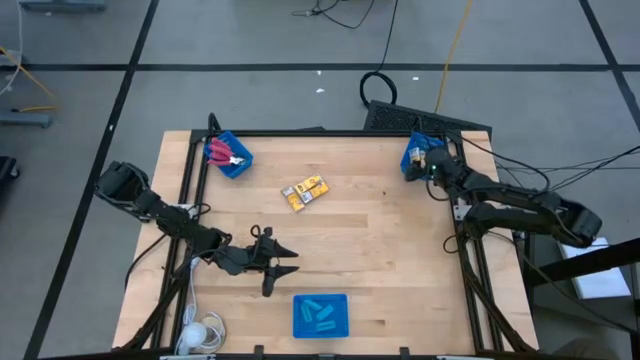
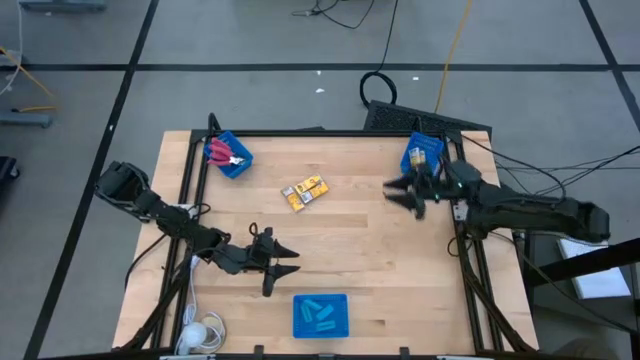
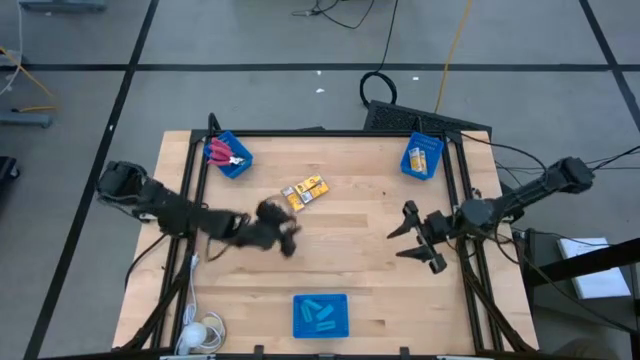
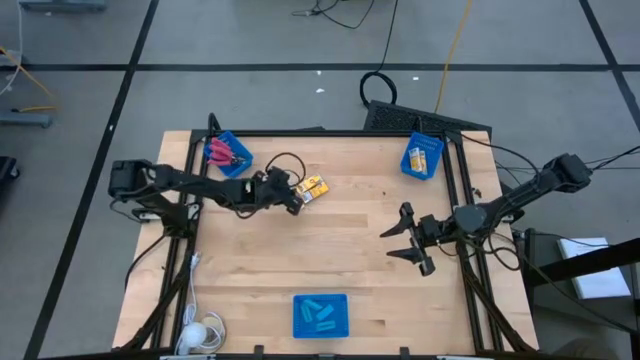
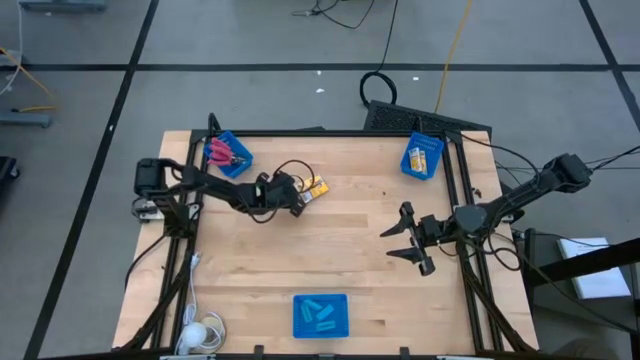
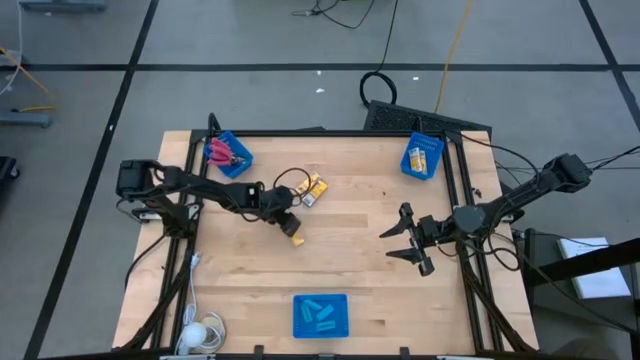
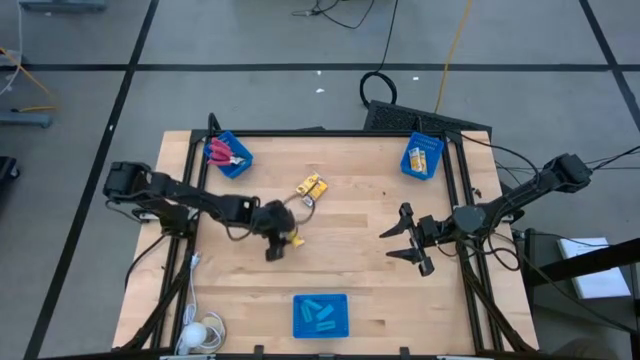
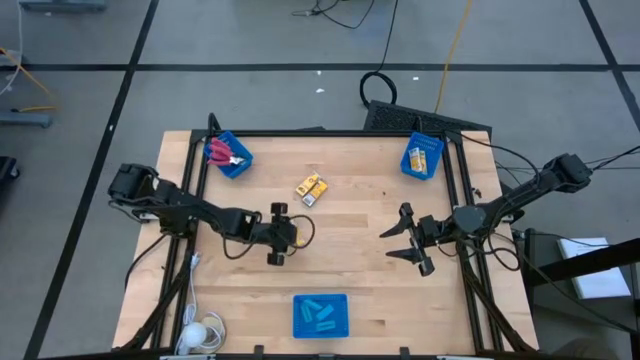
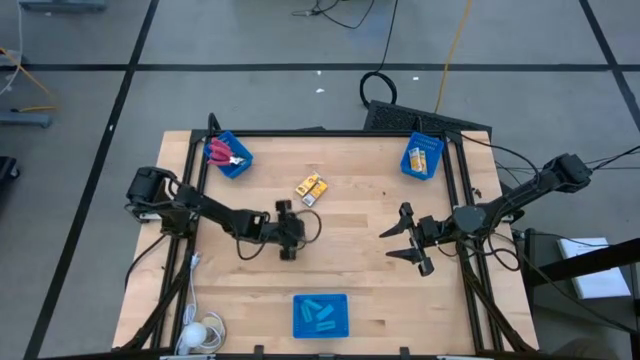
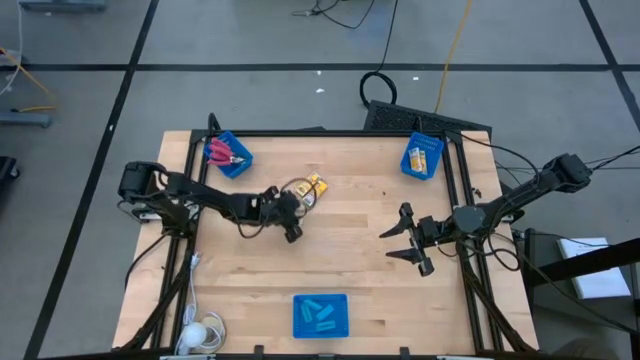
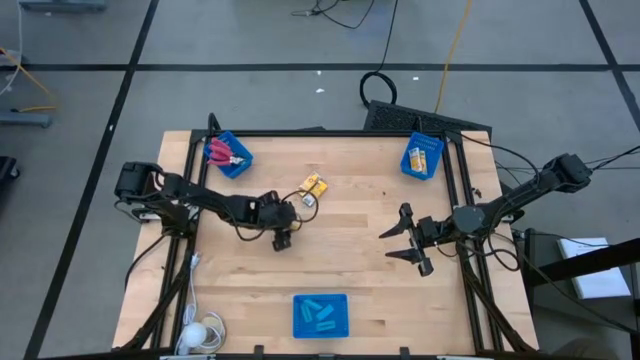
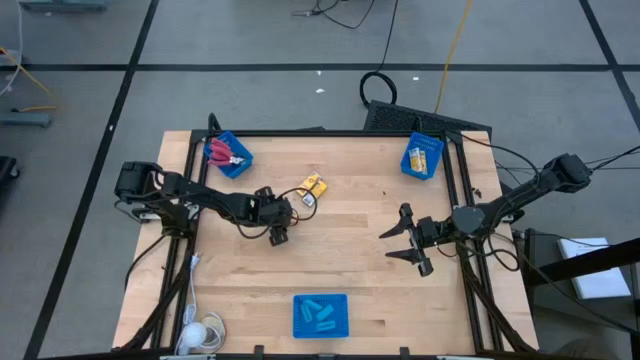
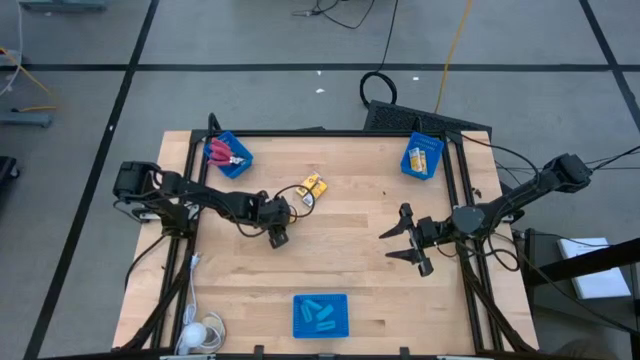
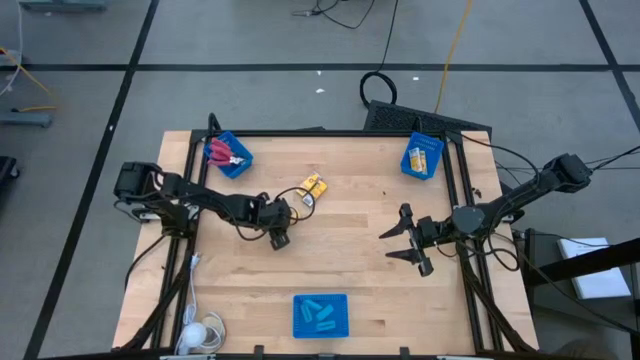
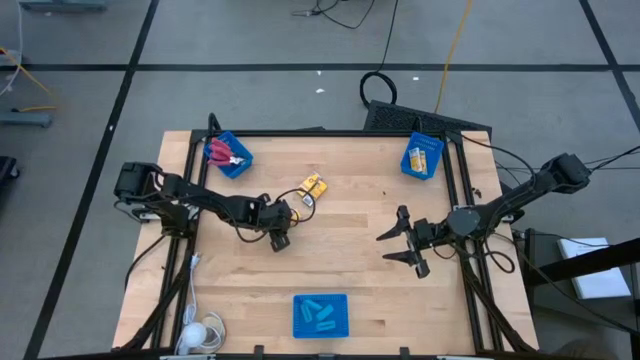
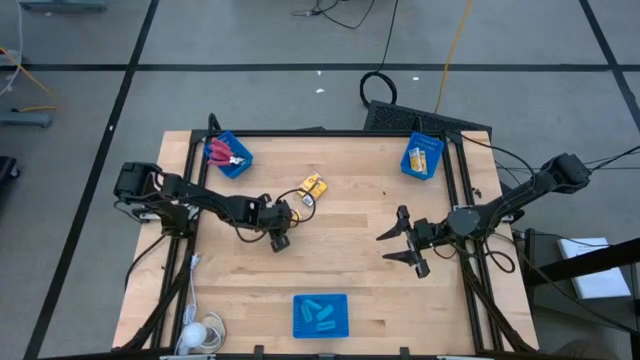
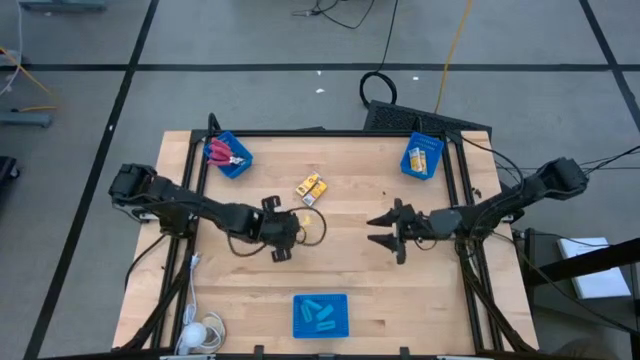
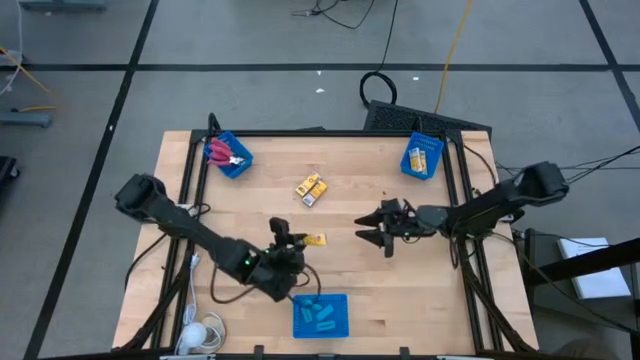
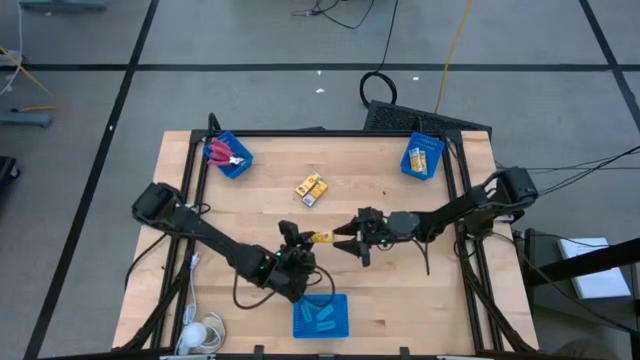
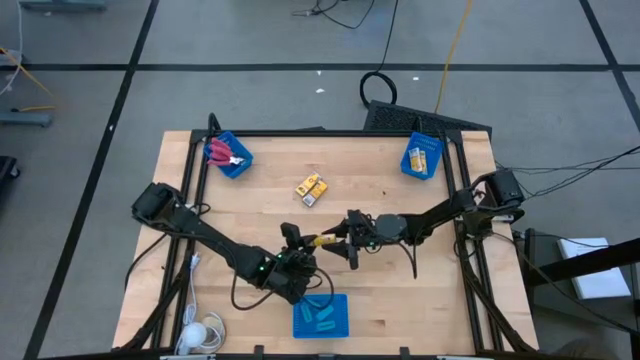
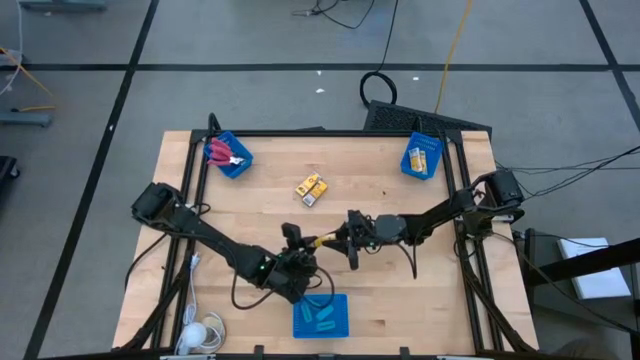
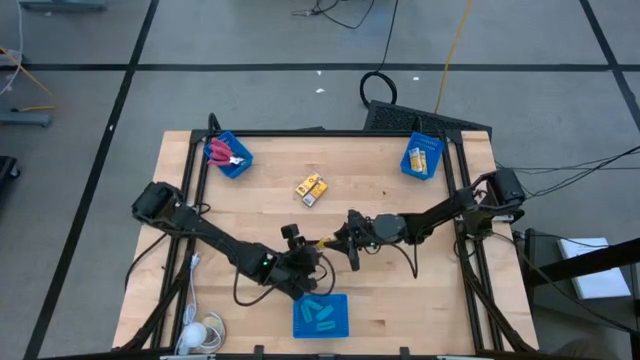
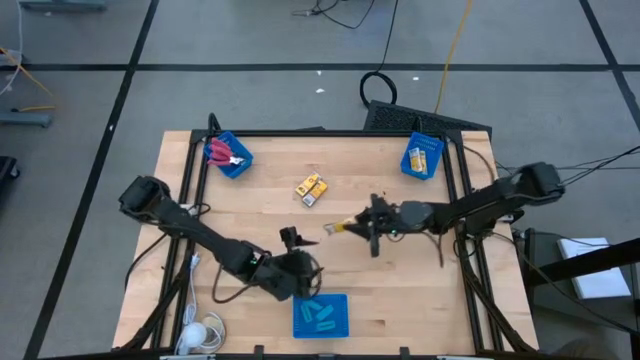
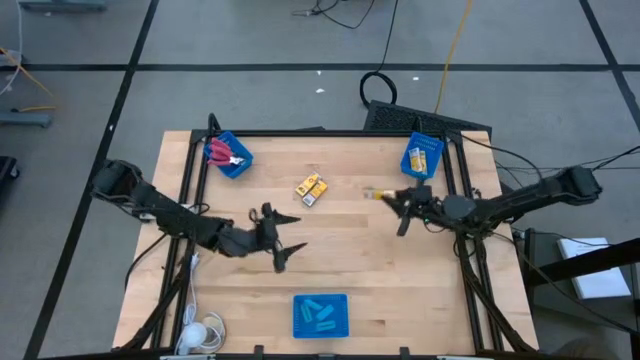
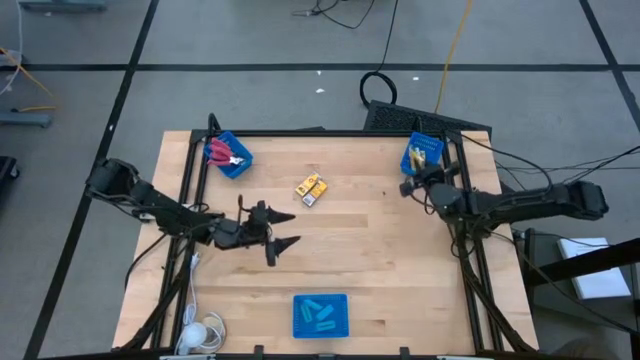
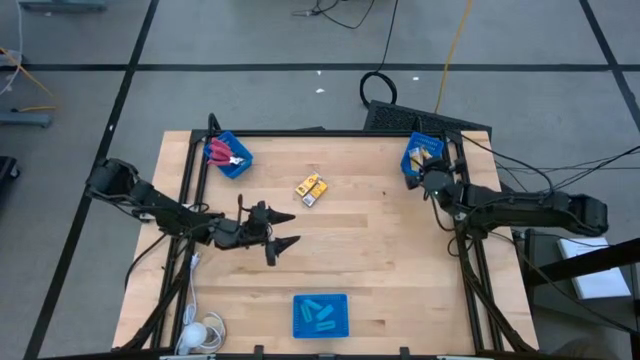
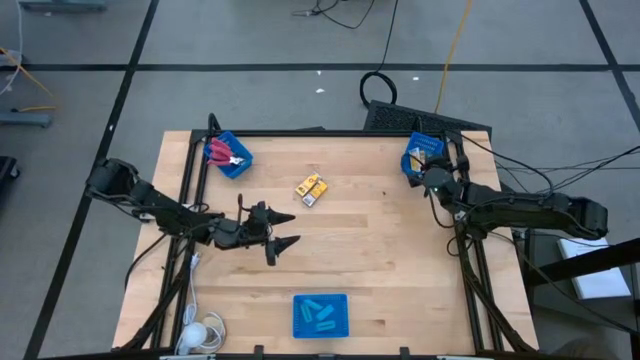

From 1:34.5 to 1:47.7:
Task: Pick & Place School Supplies
Put the crayon box into the right blue bin

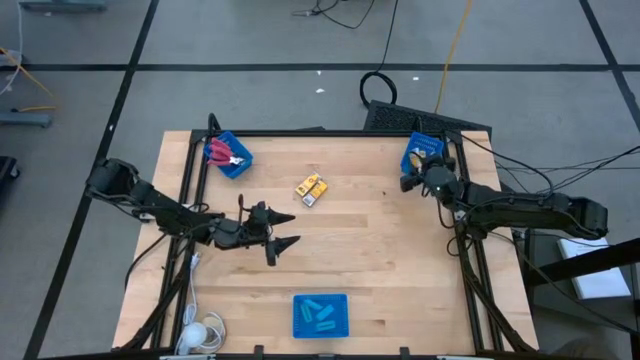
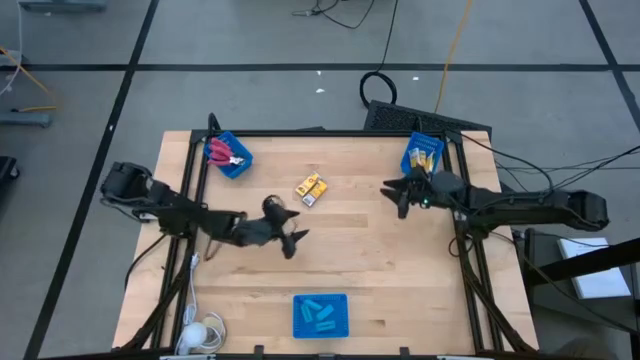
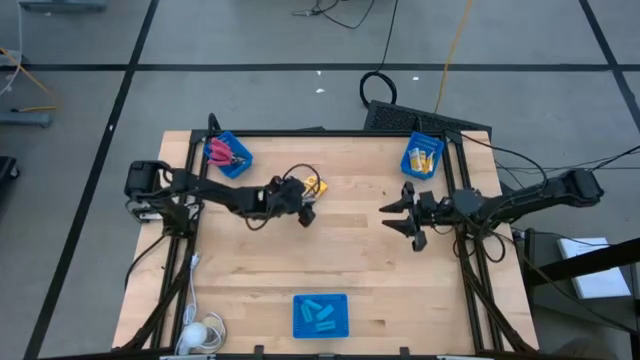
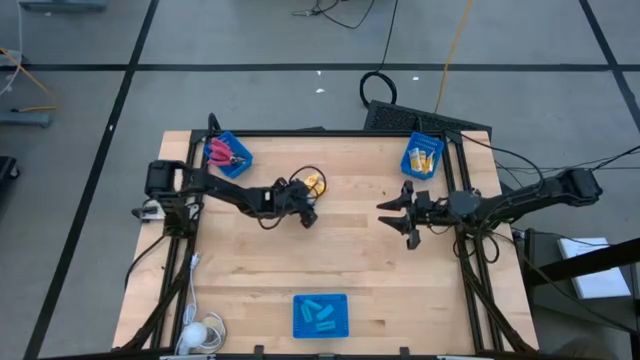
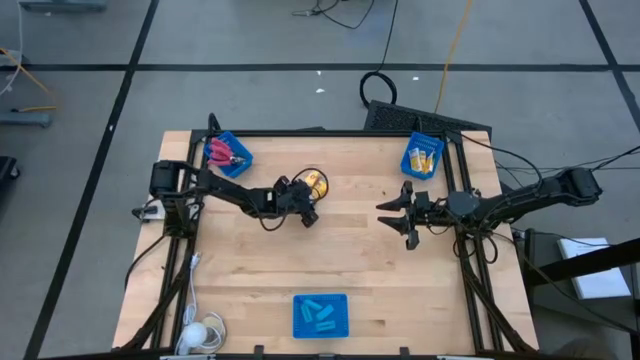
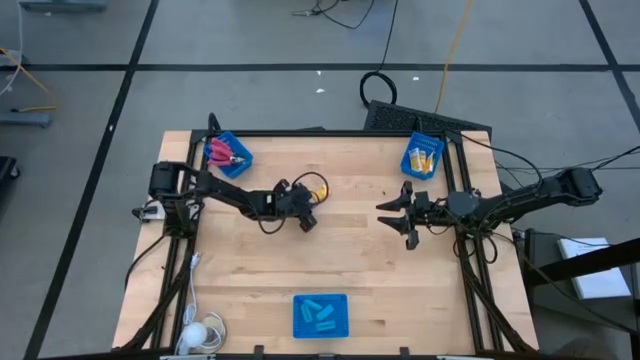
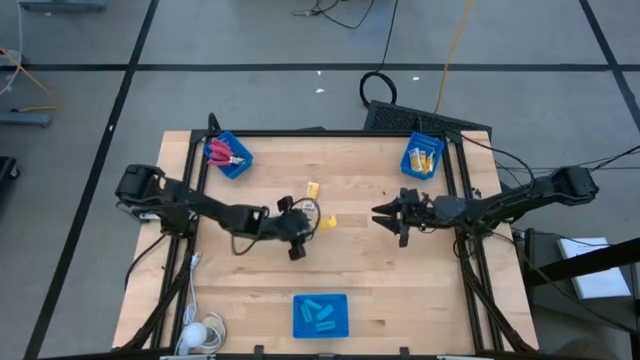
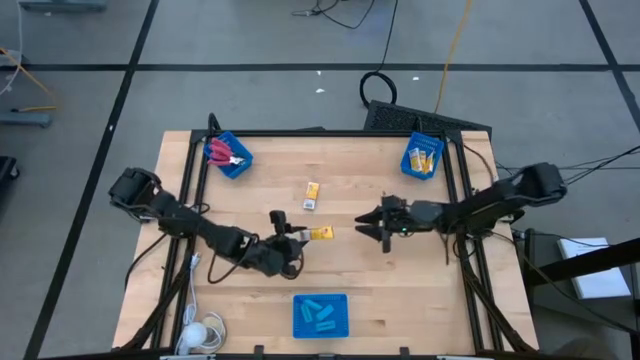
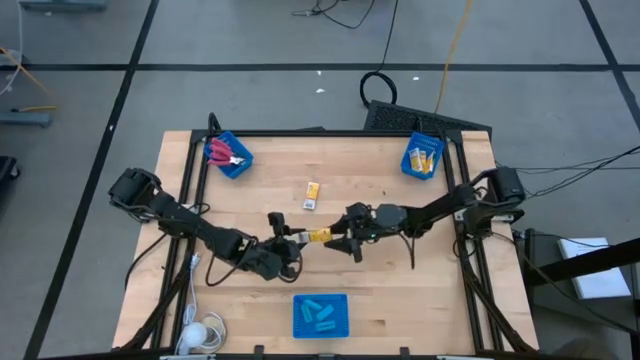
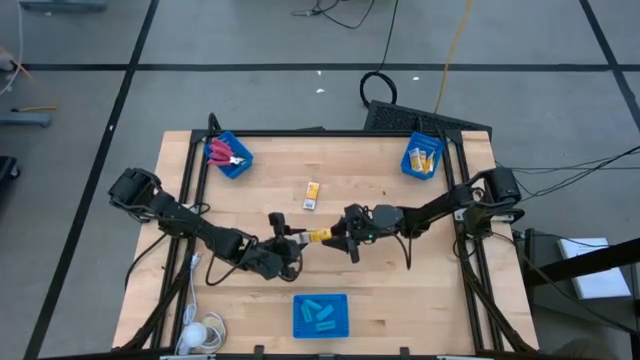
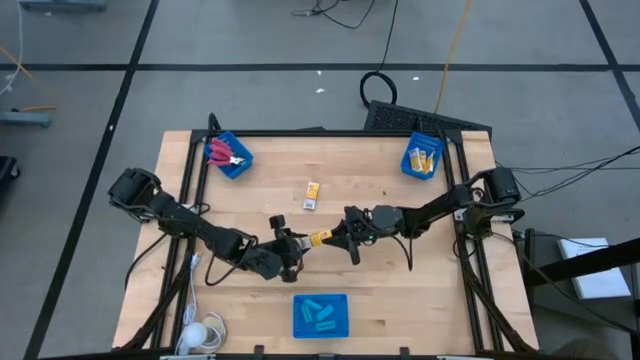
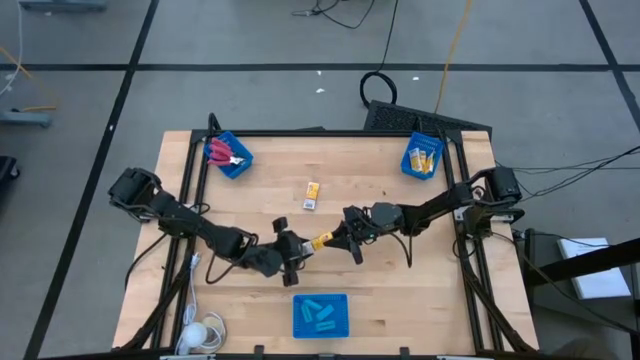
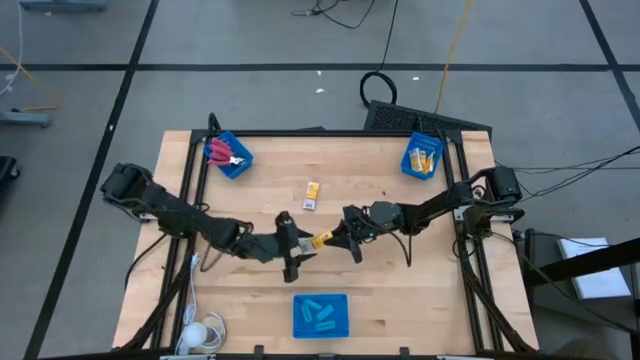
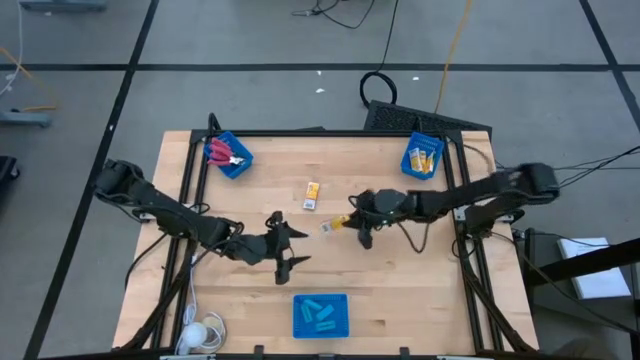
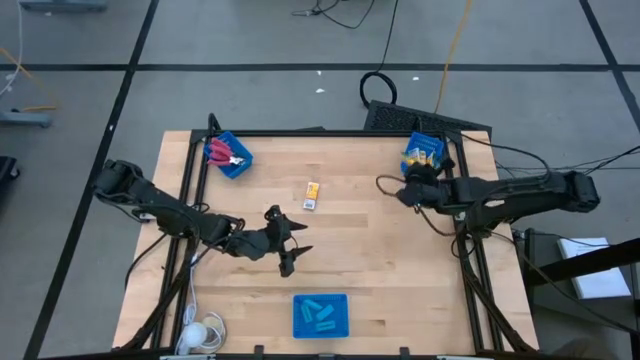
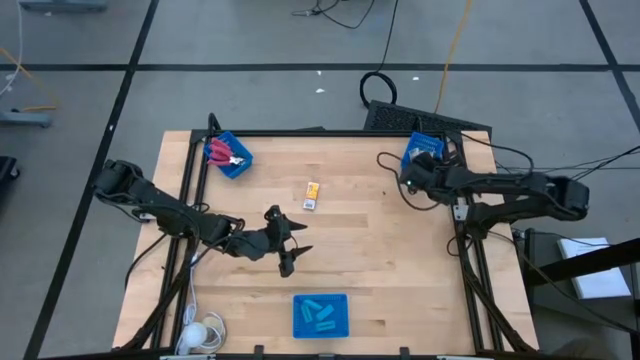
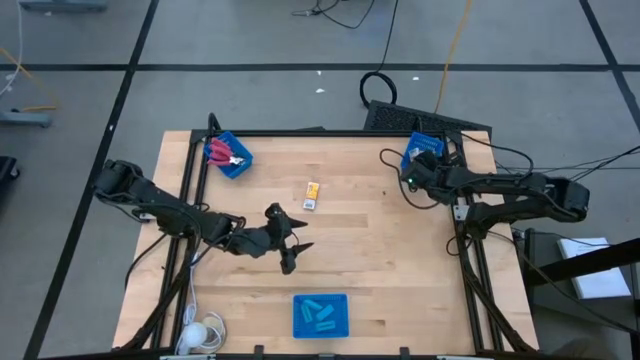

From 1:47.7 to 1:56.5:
Put the crayon box into the right blue bin
